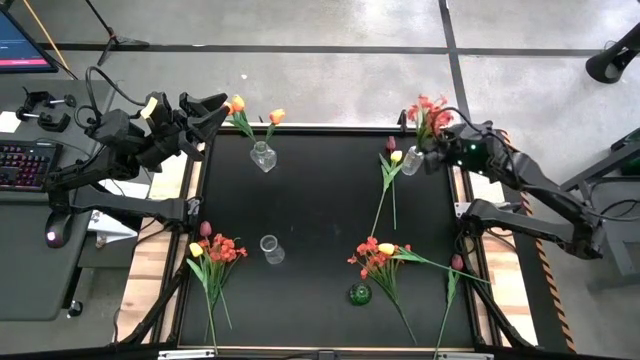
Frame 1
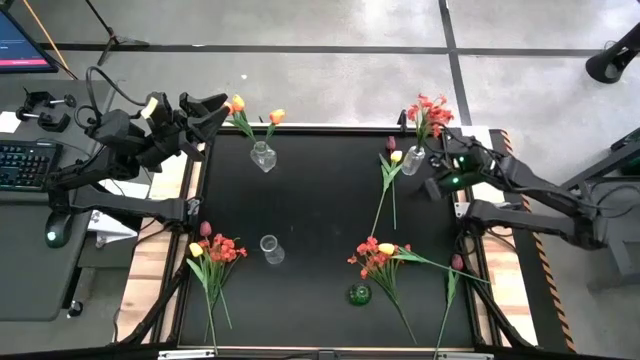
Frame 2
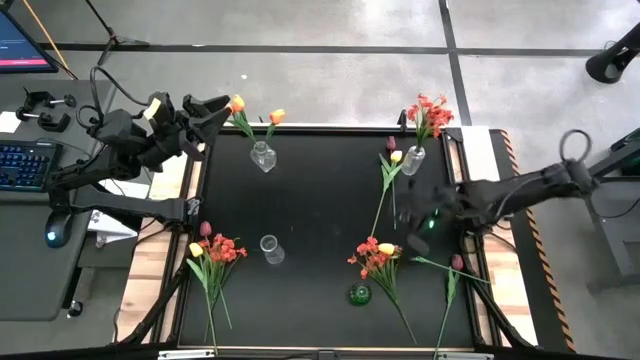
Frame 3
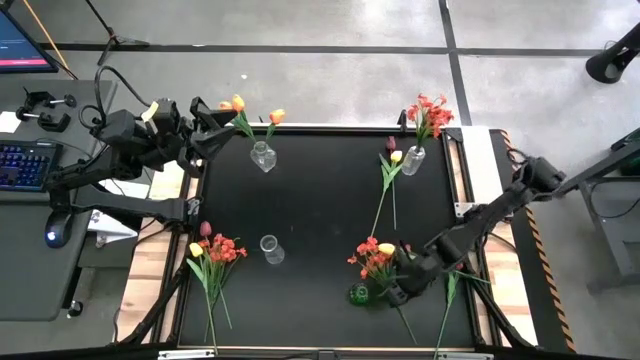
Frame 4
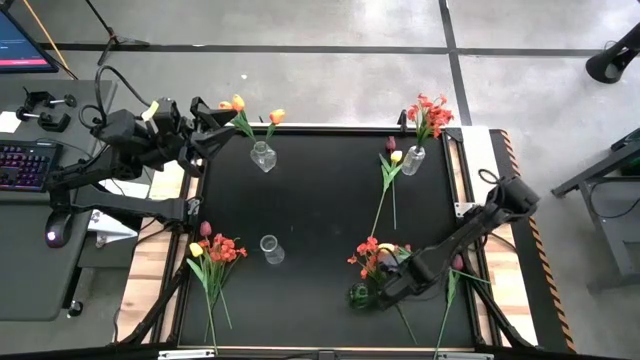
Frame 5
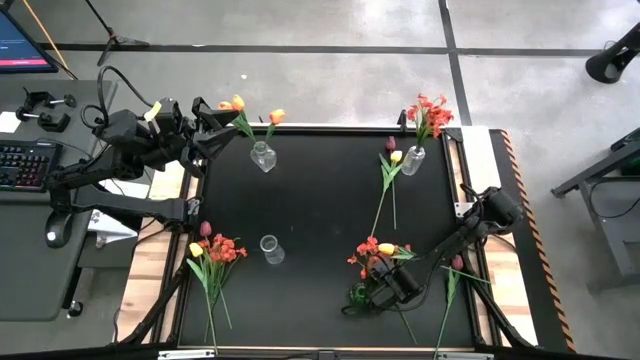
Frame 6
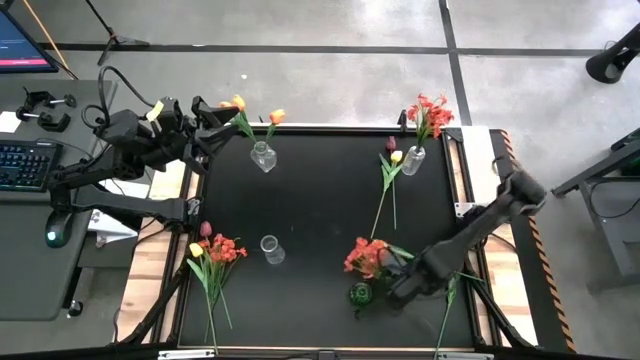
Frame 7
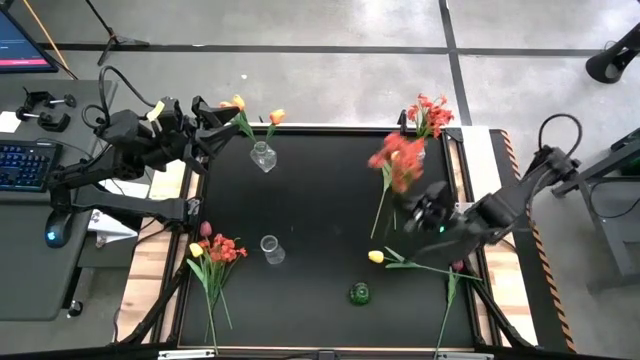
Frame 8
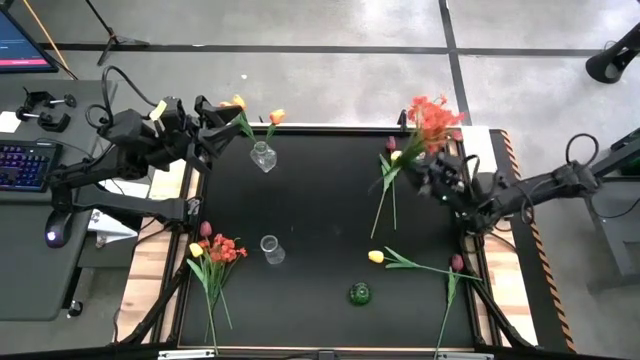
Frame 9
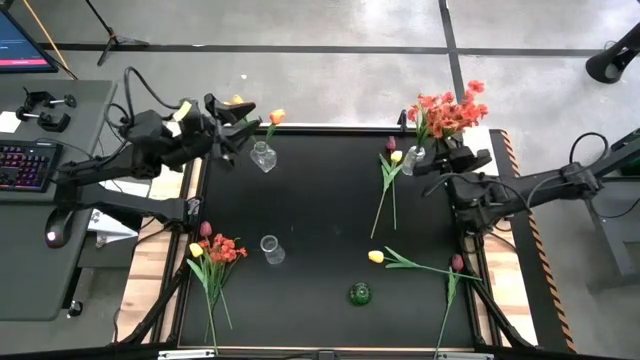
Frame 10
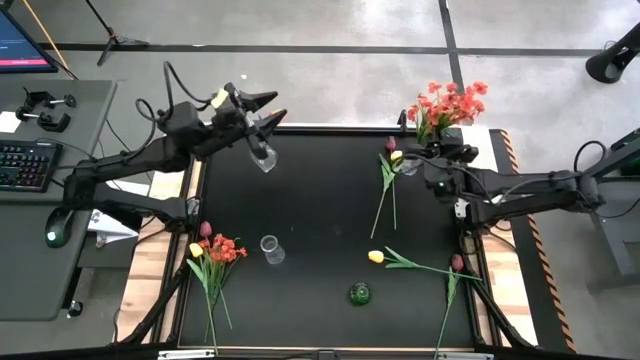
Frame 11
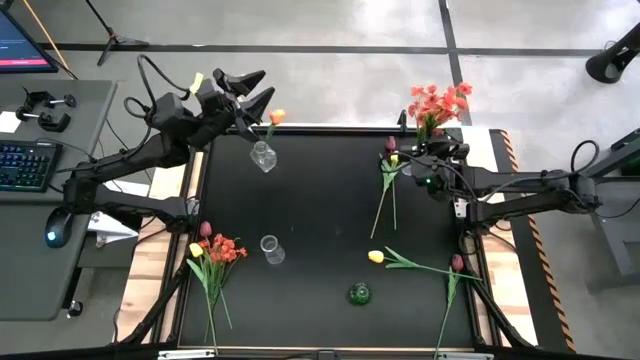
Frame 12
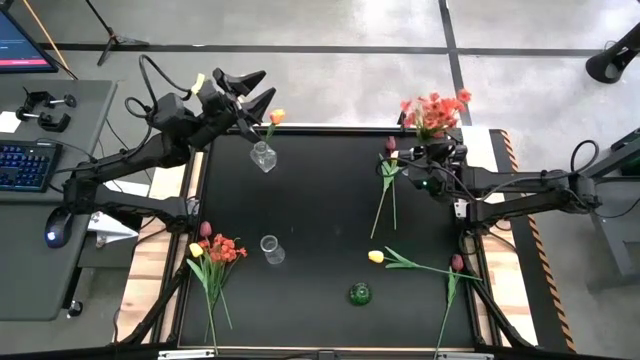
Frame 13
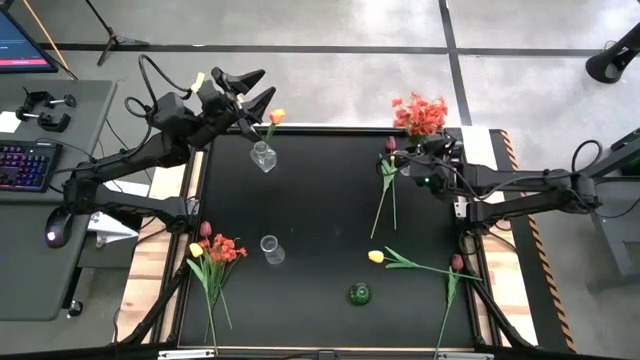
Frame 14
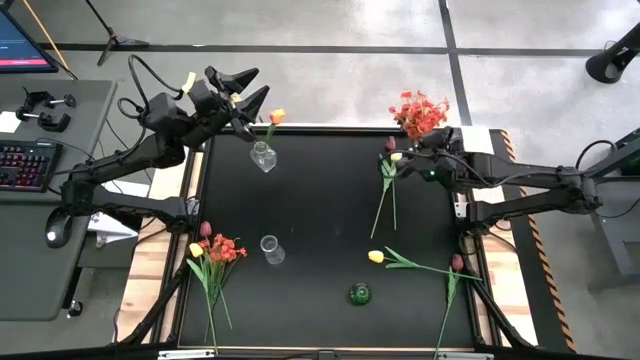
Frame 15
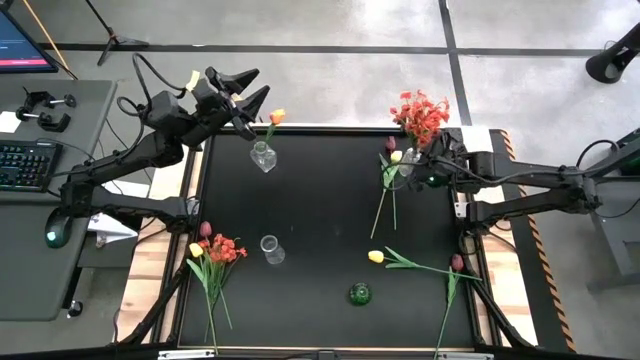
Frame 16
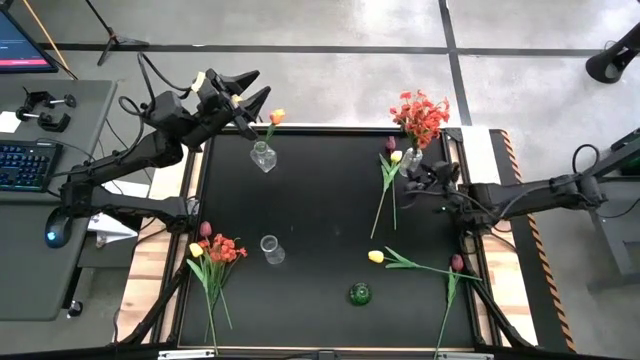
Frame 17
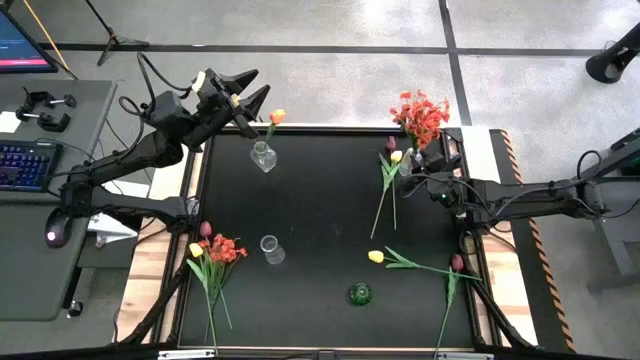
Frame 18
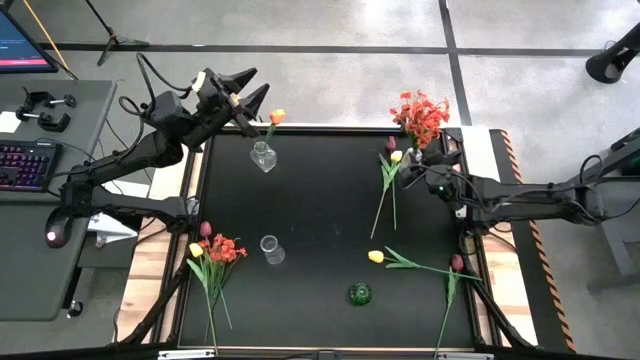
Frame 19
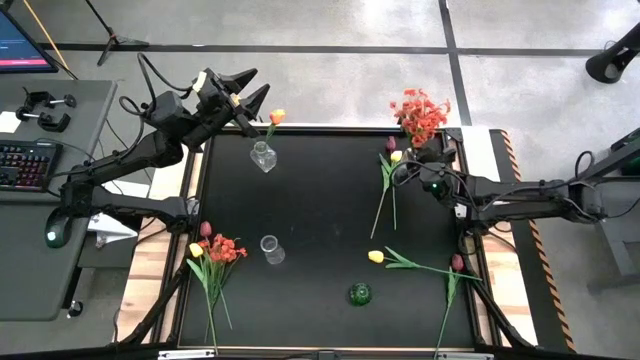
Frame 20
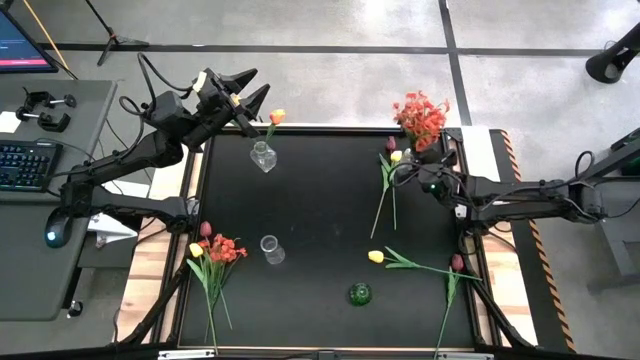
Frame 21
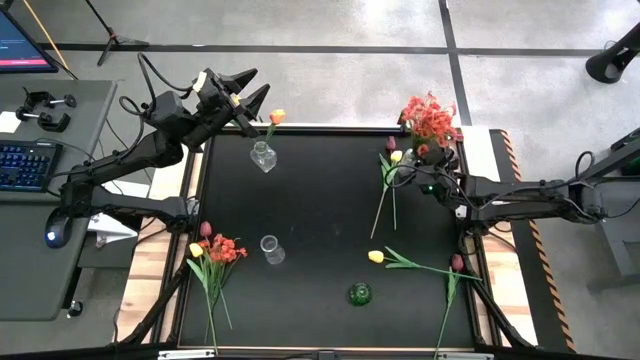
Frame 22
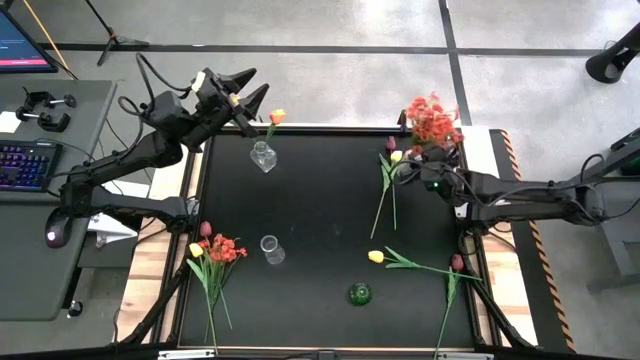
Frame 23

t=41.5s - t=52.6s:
Task: Sort flowers into vase by color
Put the right red flowers into the top right transparent vase

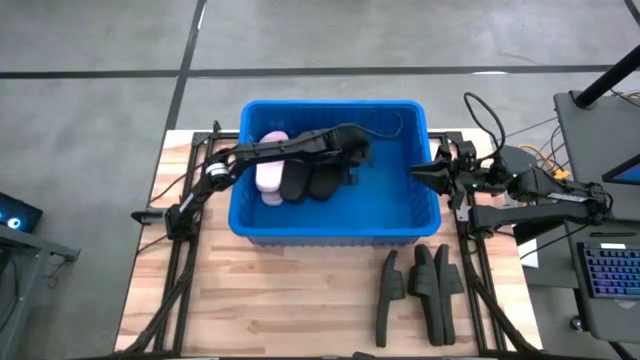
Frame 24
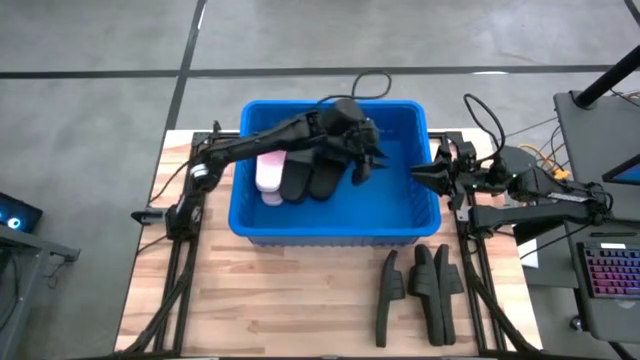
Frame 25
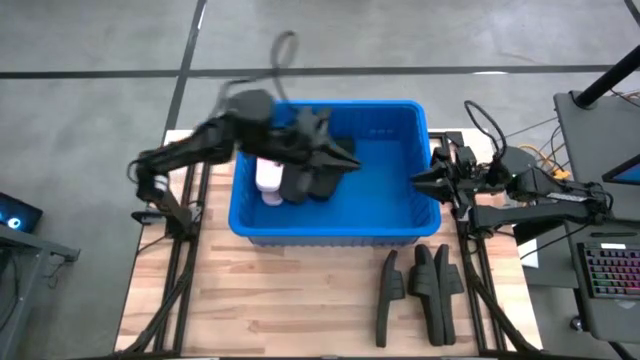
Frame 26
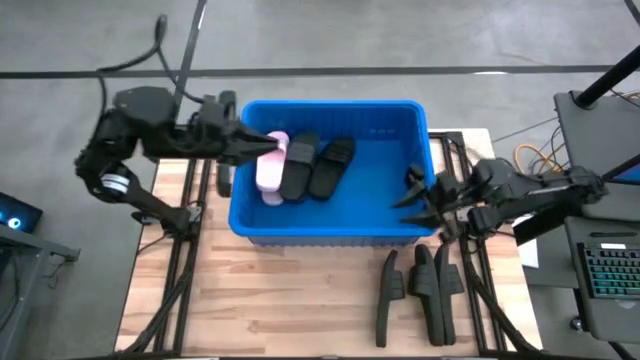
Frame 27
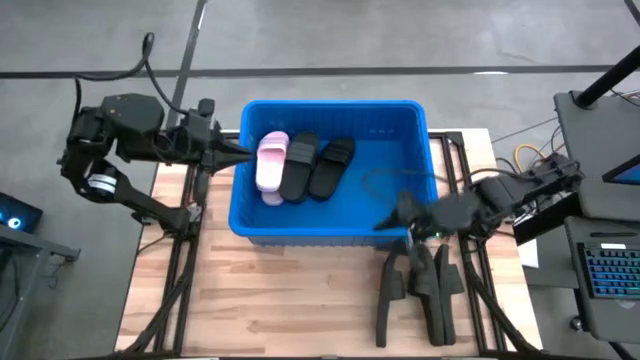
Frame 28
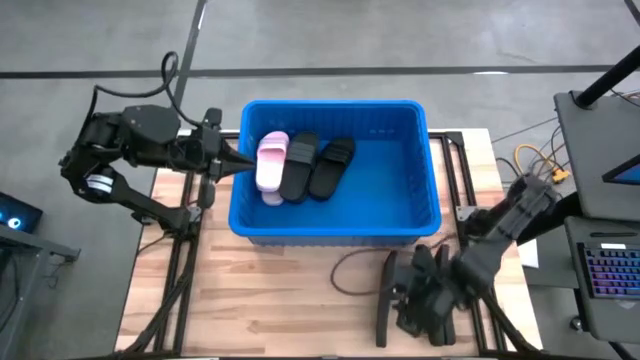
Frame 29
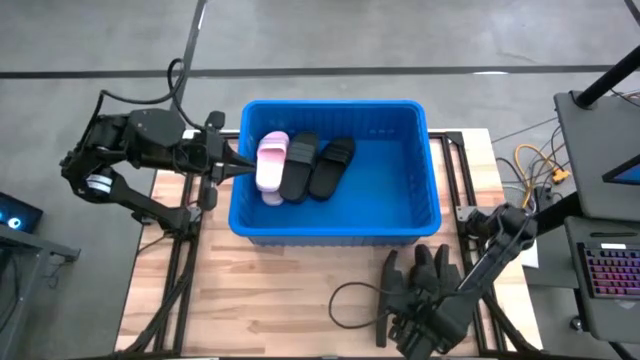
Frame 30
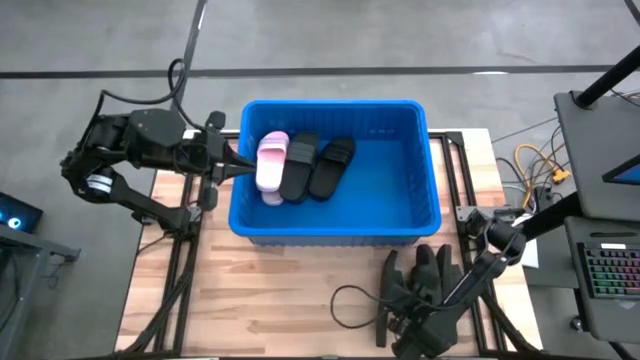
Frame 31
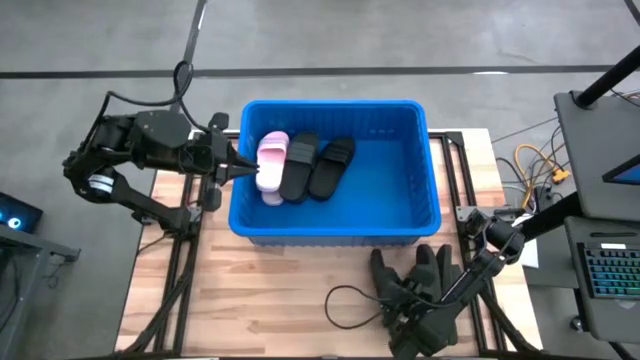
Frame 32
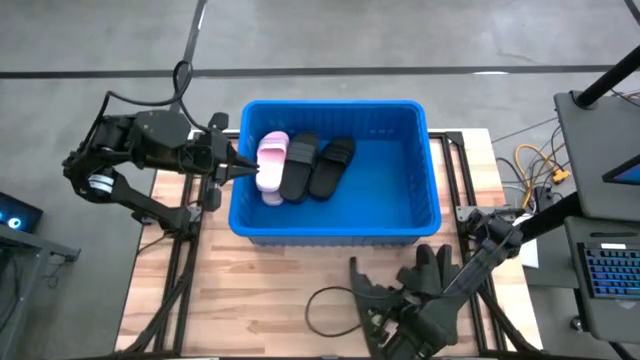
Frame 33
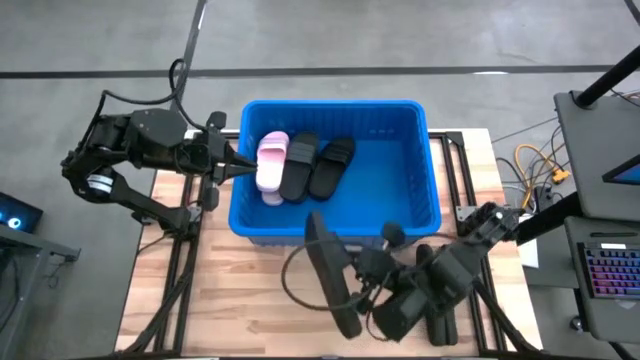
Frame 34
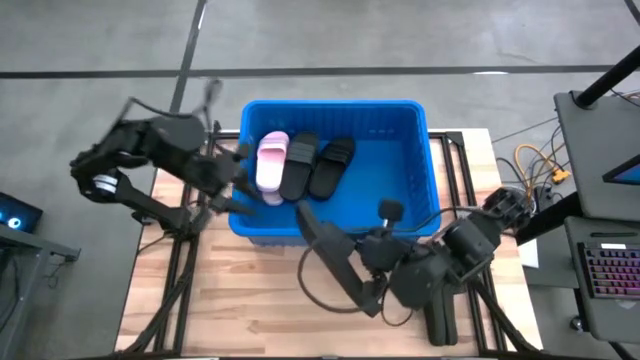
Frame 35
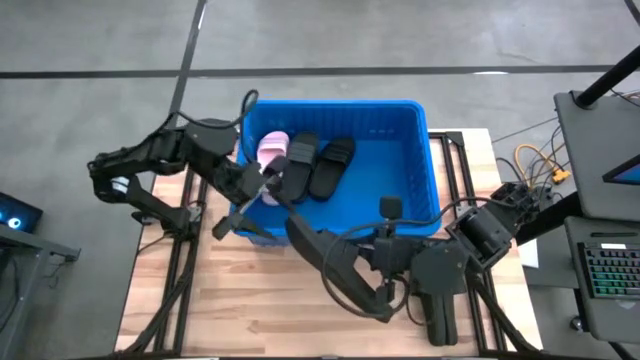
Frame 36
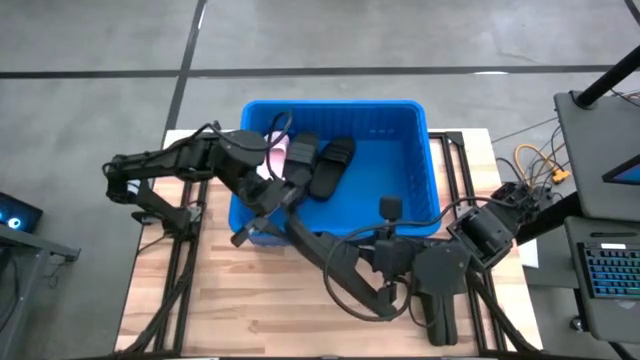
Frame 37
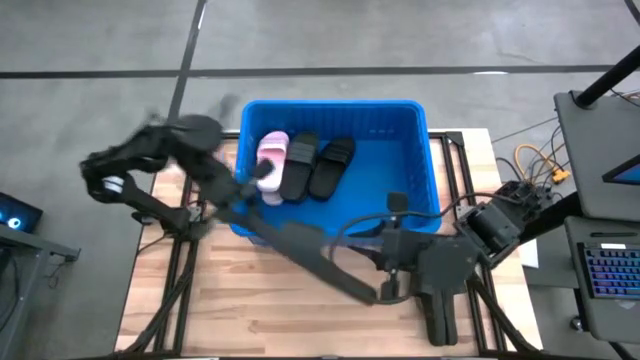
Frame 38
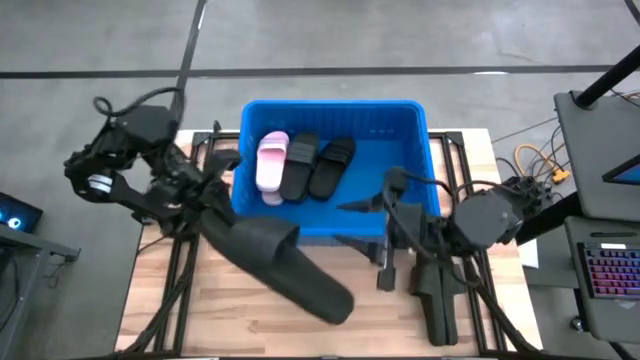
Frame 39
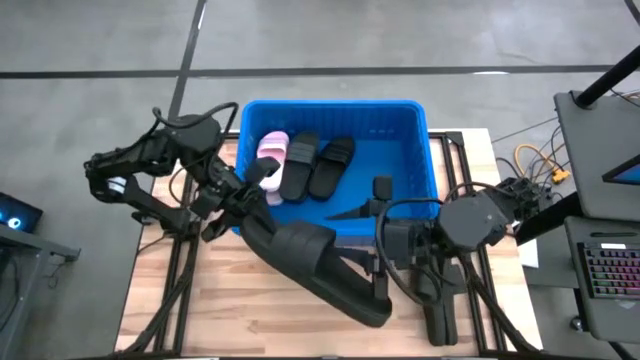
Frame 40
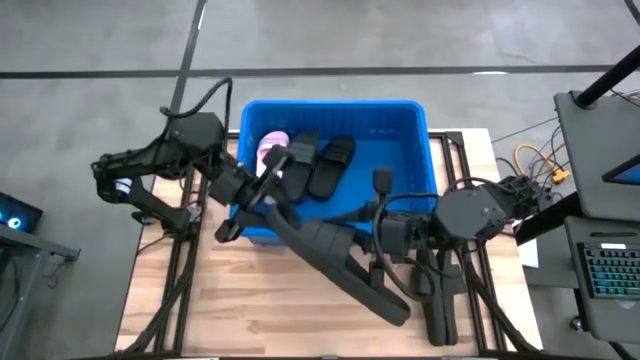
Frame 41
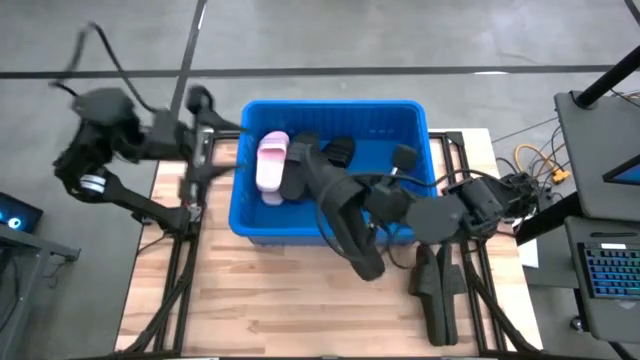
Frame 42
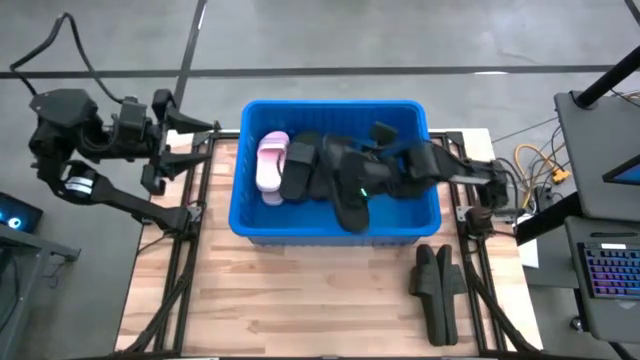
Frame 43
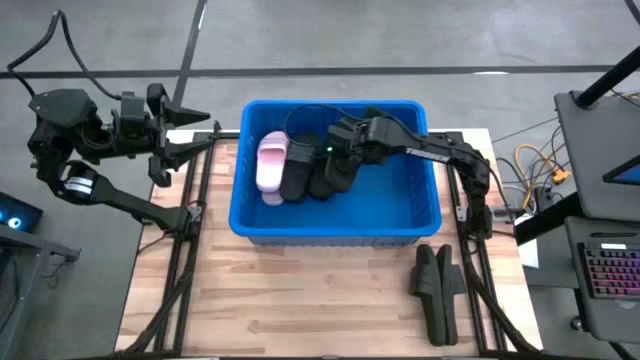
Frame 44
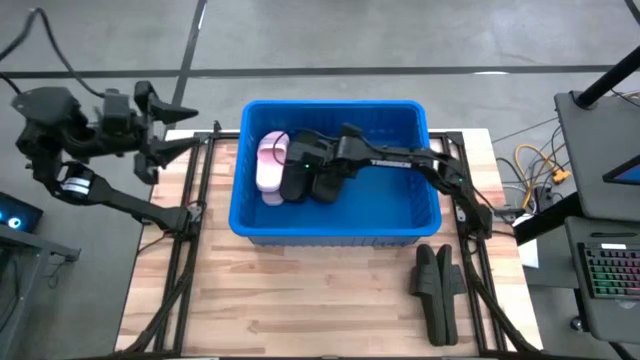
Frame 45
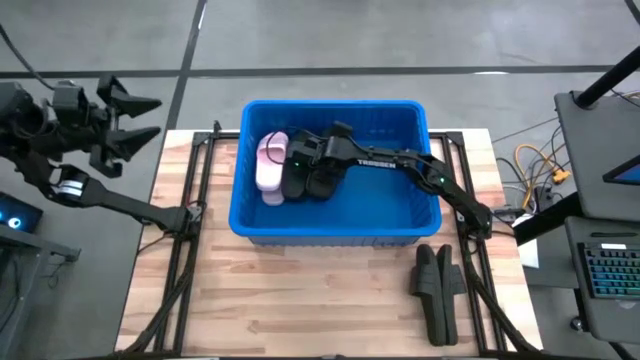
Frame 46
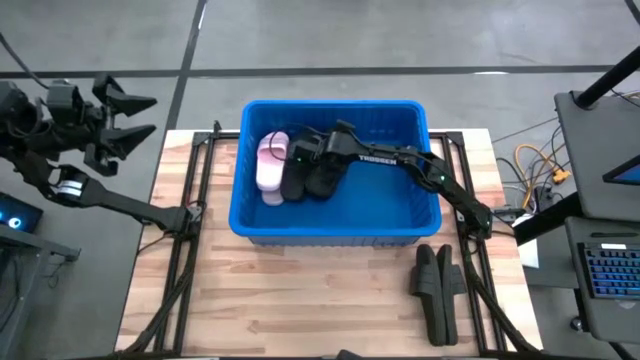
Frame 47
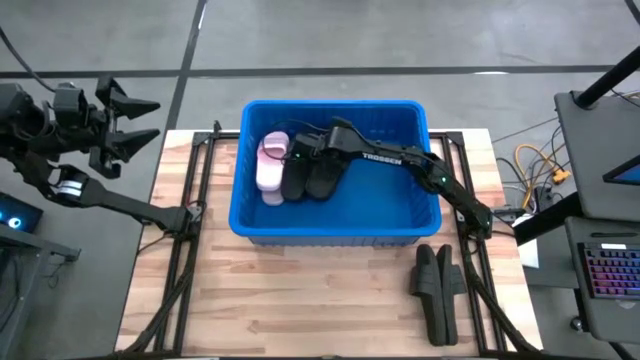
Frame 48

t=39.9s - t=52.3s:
Task: Pick and place slides into bin
Put the left black slipper into the blue bin
